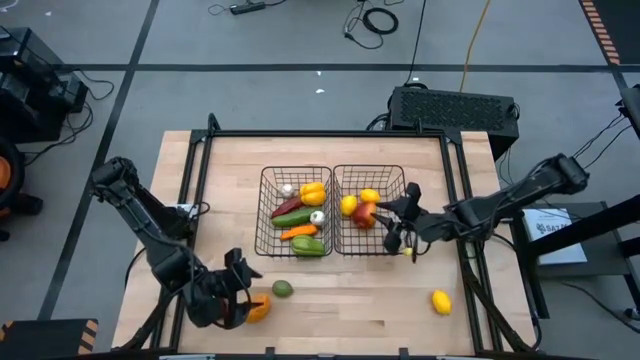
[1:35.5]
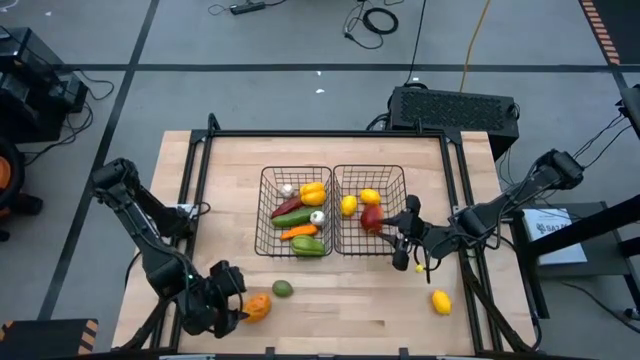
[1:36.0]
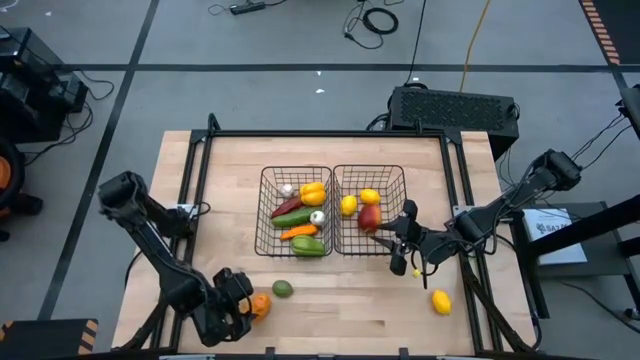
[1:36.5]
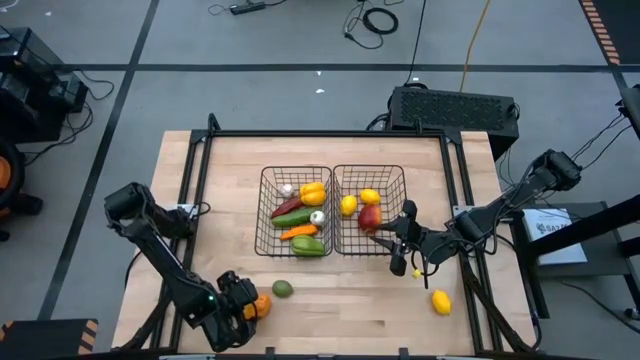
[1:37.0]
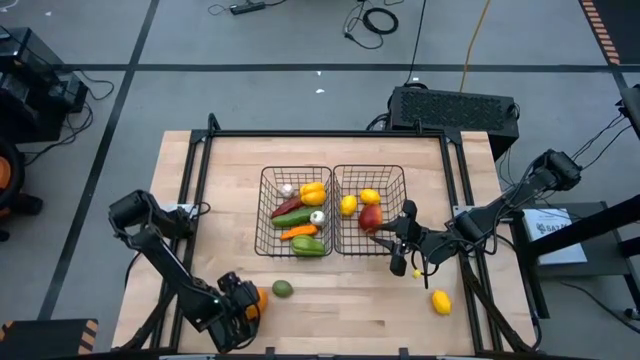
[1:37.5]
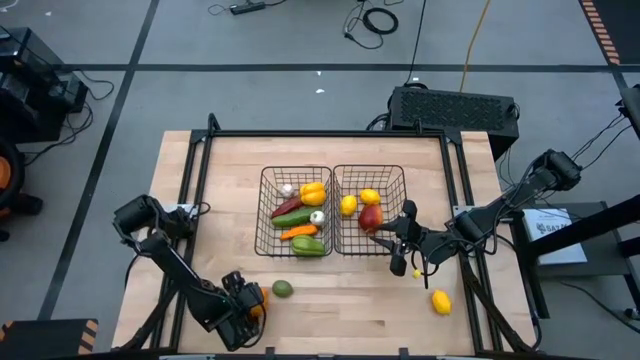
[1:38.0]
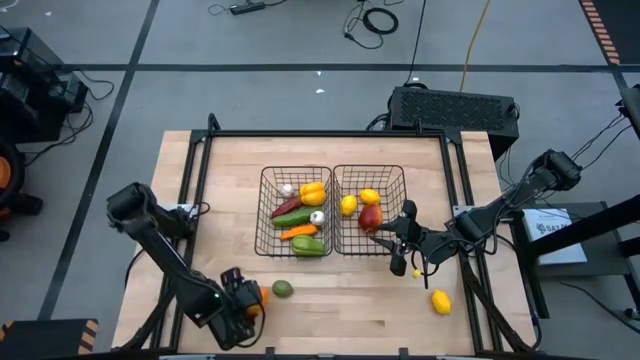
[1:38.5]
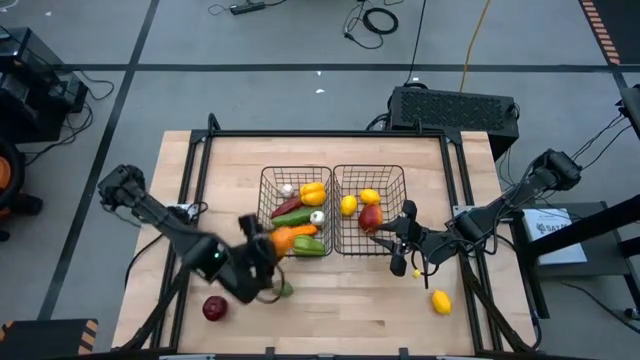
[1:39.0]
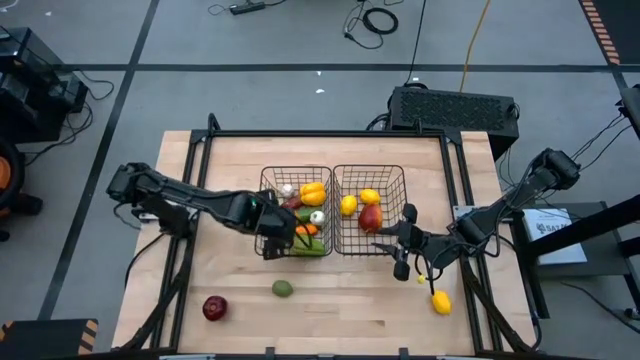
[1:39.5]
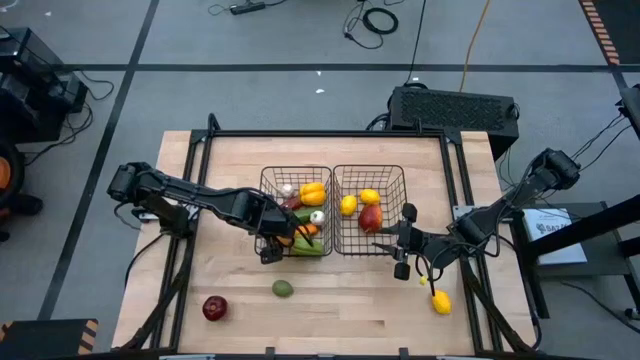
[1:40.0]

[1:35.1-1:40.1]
Task: Sort produce into baskets
Put the orange mango into the left black wire basket

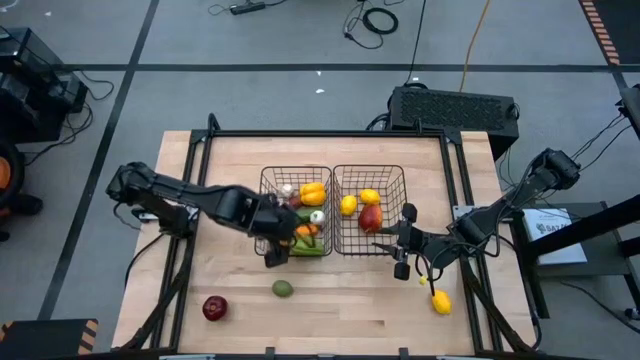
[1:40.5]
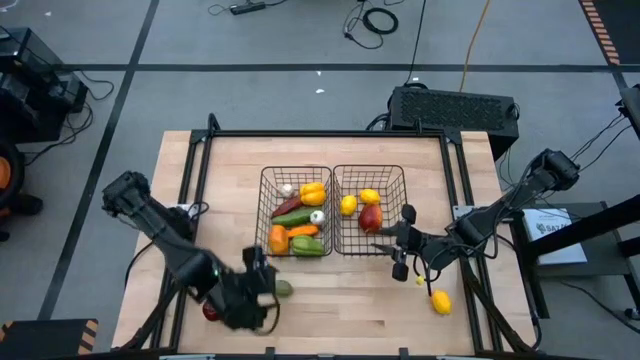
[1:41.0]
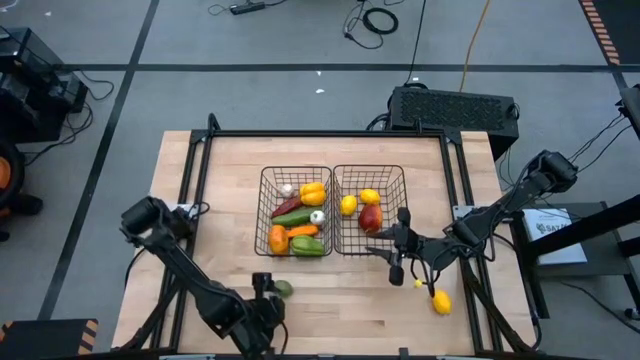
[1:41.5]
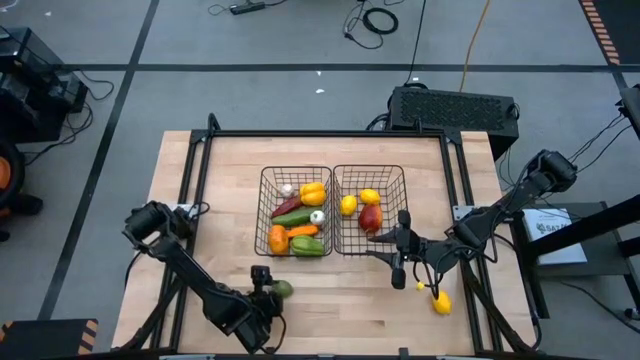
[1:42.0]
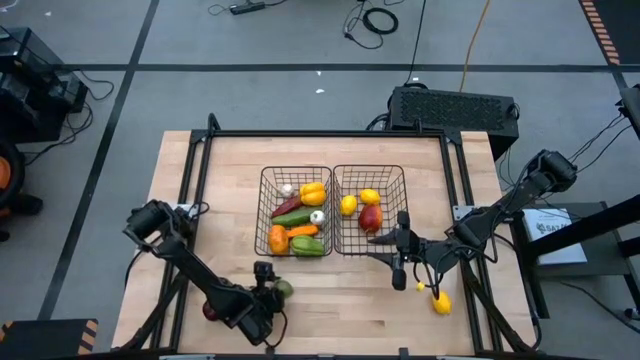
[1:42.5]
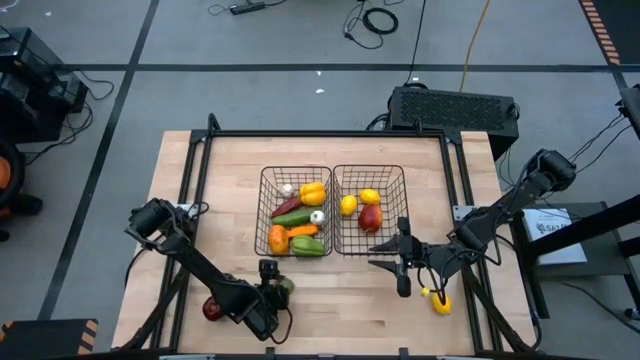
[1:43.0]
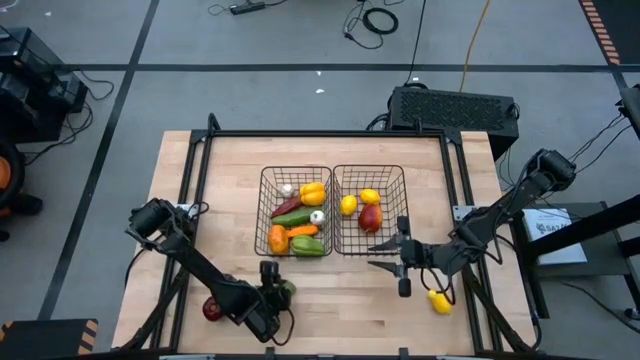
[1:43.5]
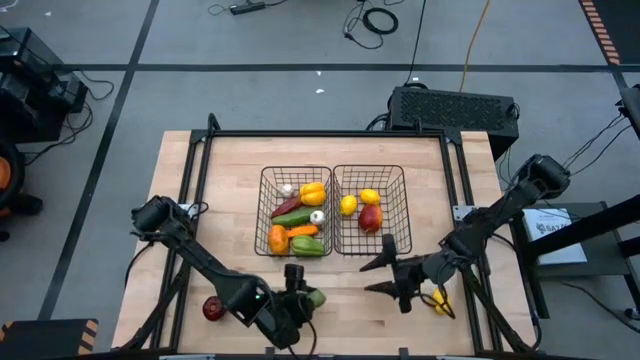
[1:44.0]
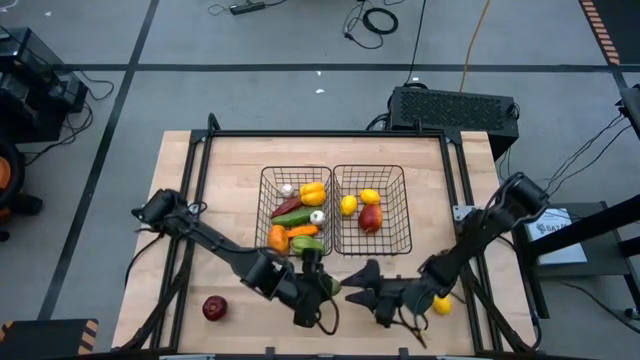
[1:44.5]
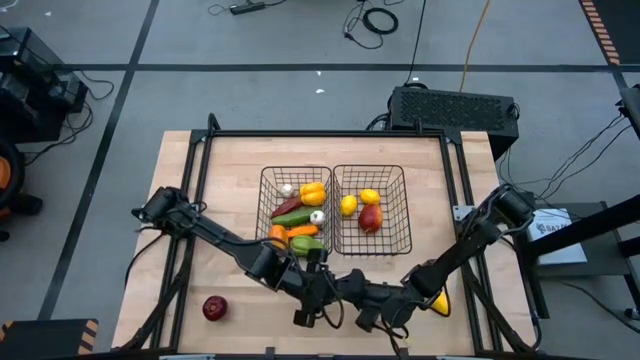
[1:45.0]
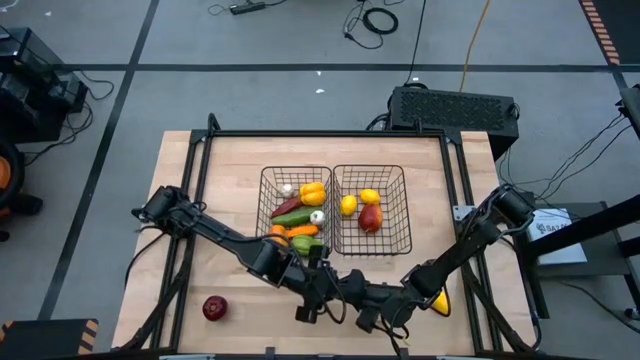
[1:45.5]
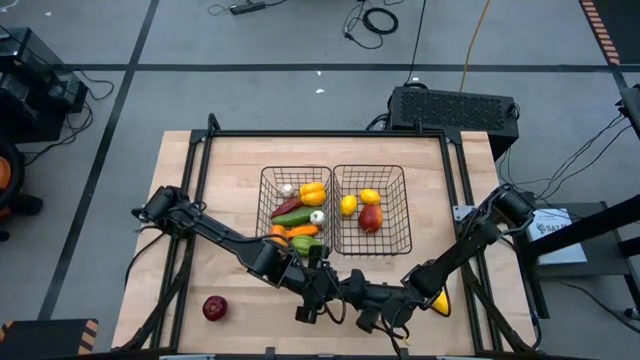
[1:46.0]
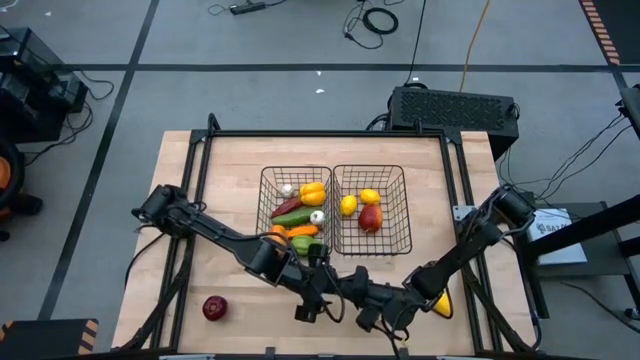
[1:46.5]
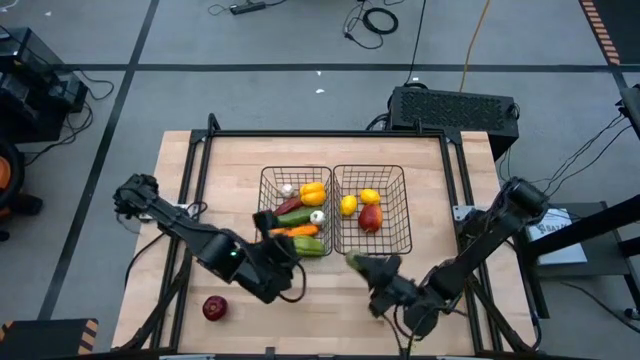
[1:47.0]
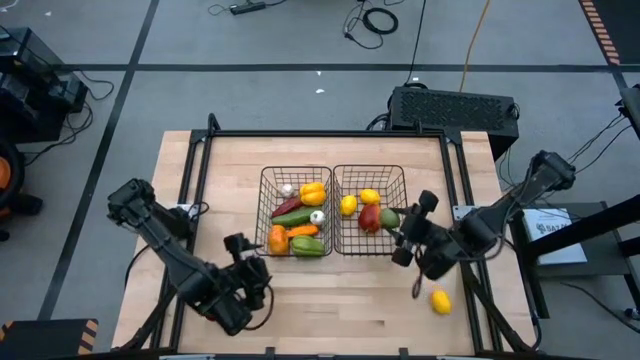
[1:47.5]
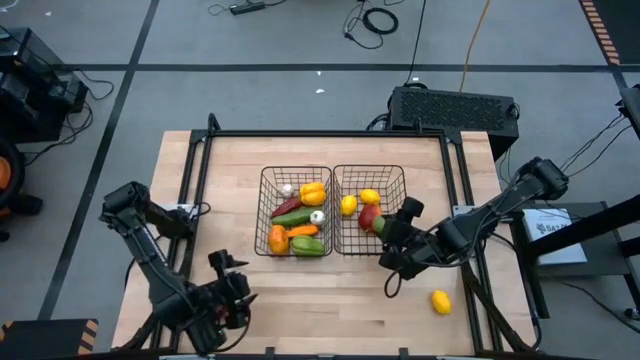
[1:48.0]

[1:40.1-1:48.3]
Put the green lime into the right black wire basket

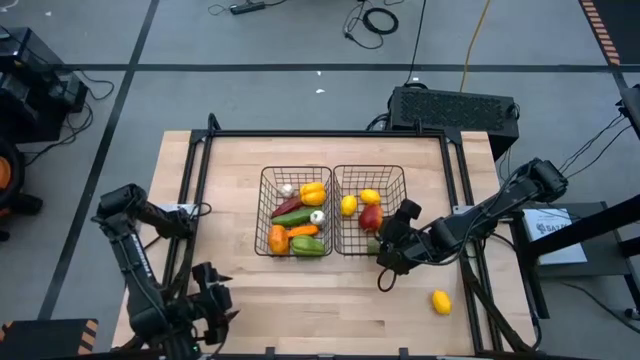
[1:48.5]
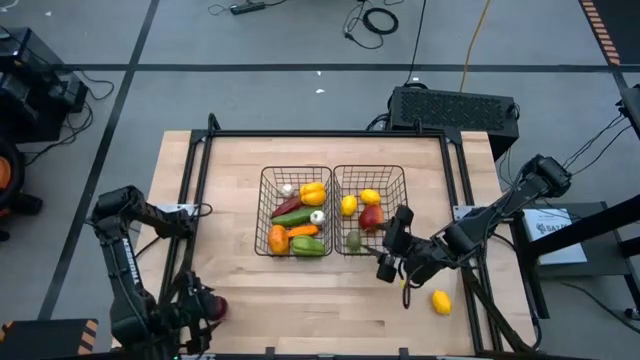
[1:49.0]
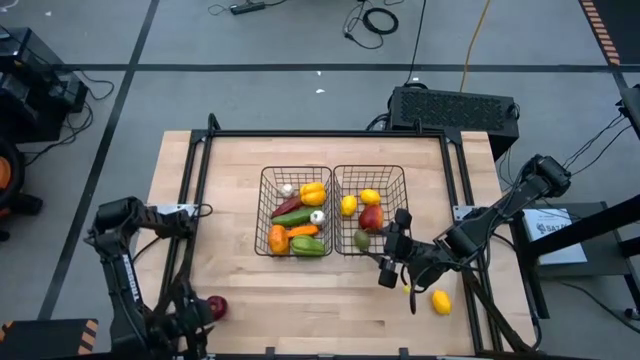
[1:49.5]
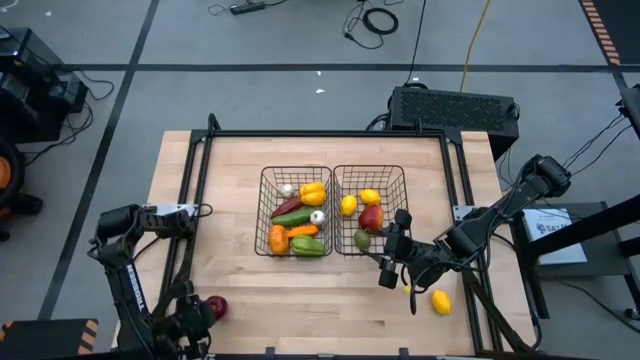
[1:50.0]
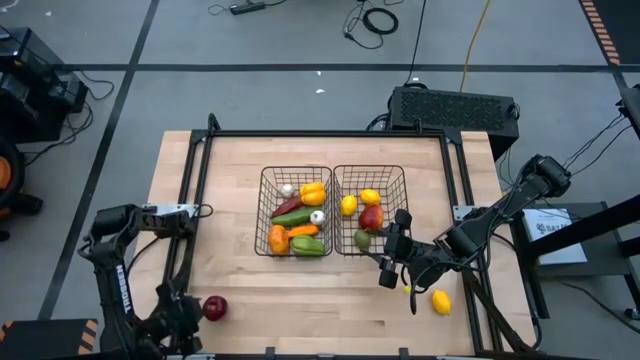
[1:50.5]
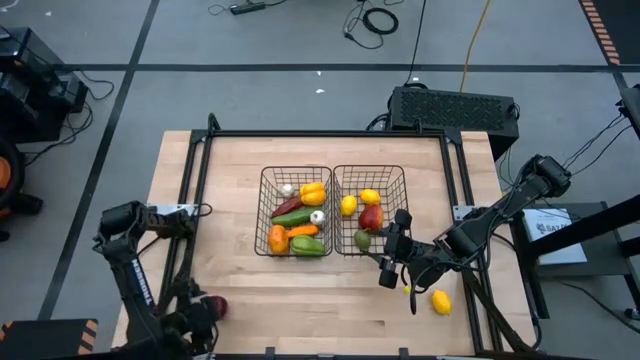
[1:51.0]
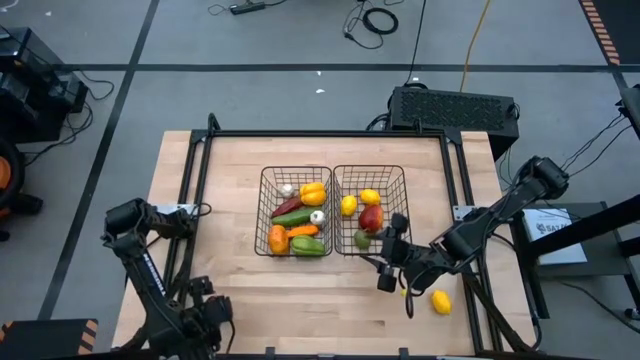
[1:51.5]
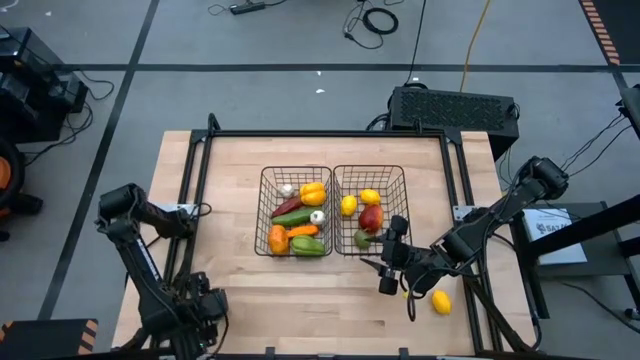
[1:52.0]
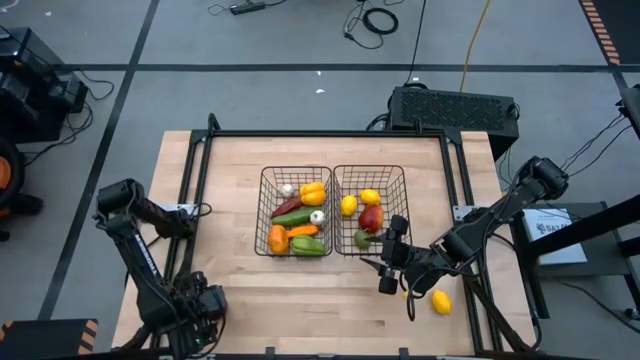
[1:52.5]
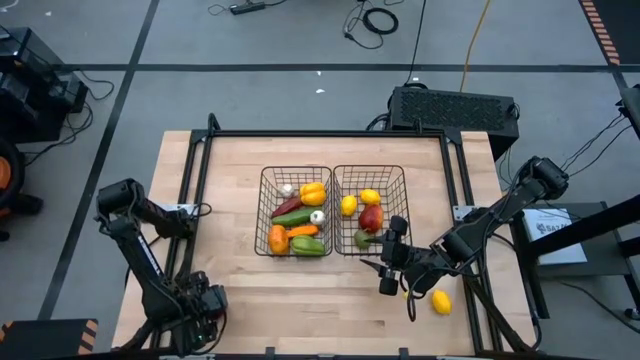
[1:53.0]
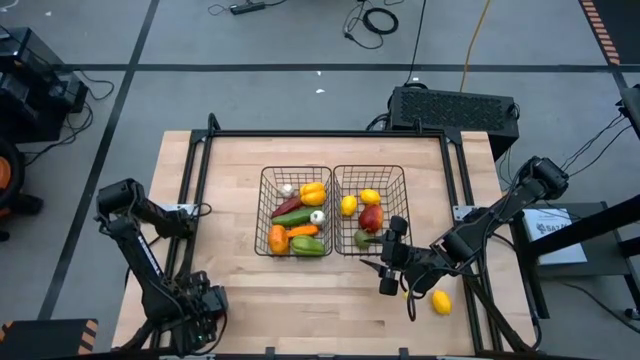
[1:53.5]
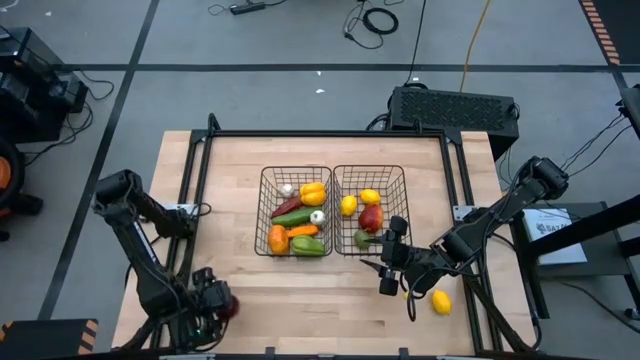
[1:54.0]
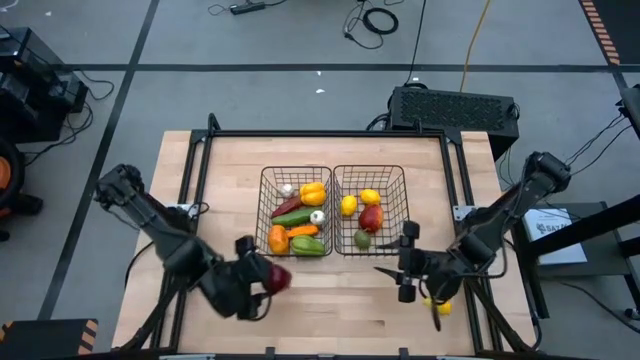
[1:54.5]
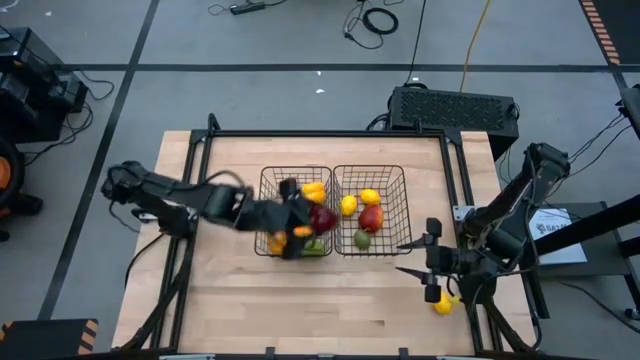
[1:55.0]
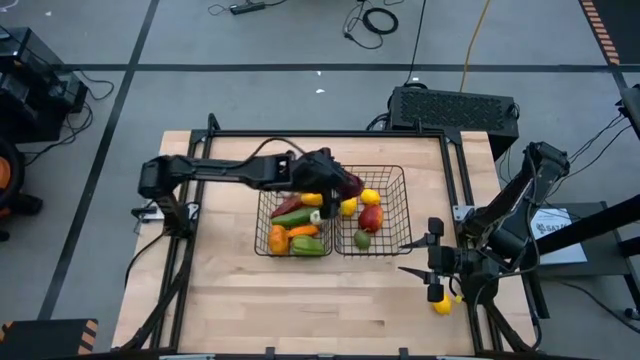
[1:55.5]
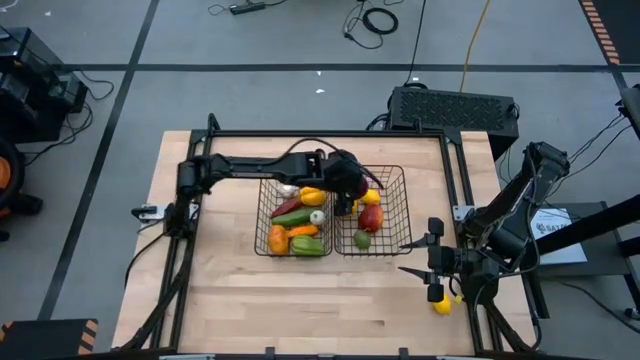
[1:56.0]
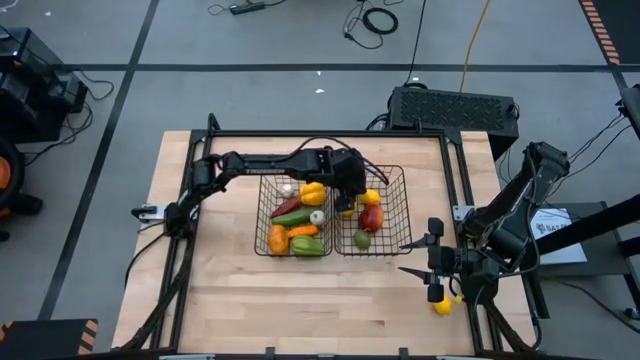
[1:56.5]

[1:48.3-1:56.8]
Put the red apple into the right black wire basket
